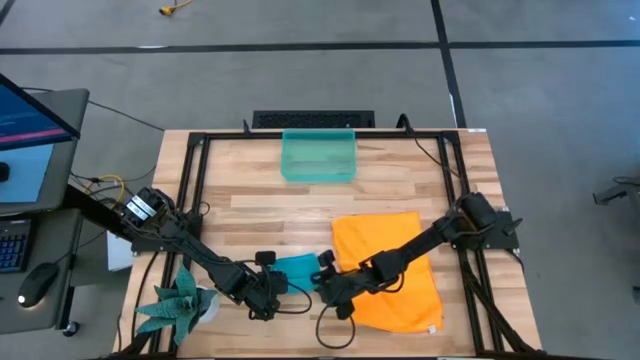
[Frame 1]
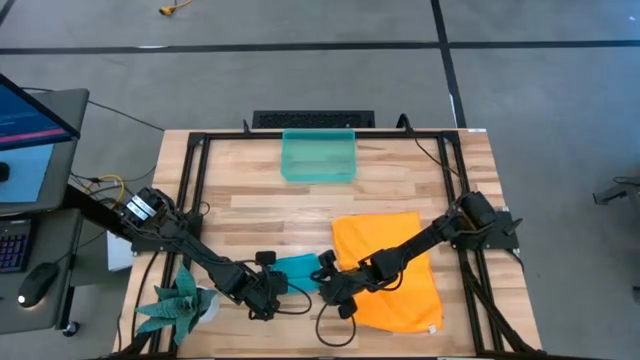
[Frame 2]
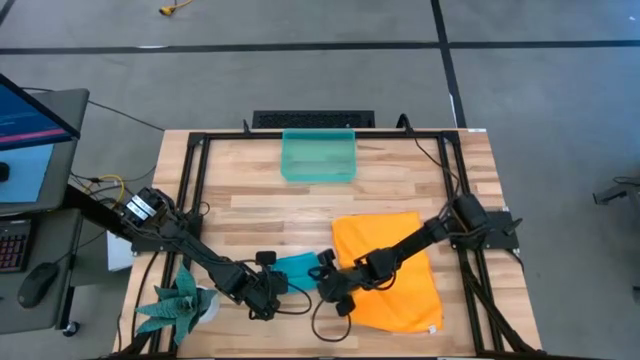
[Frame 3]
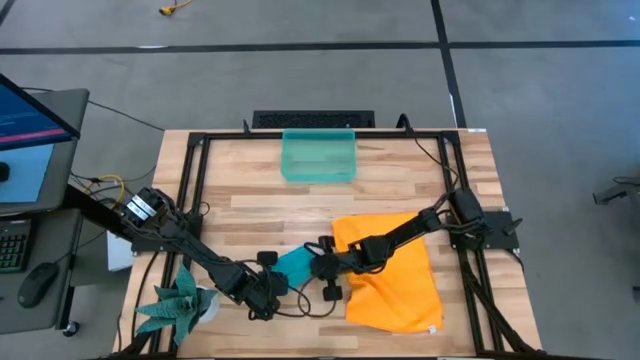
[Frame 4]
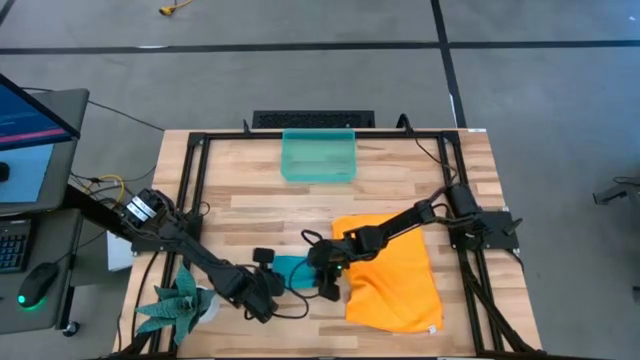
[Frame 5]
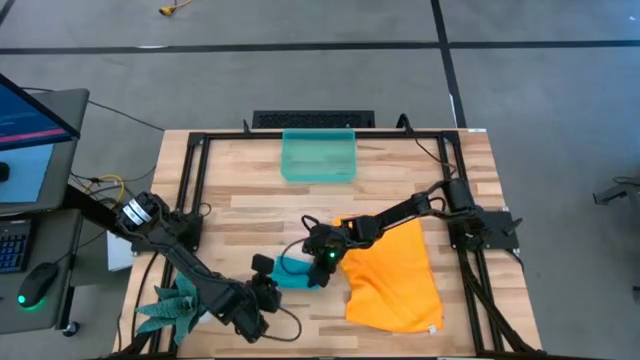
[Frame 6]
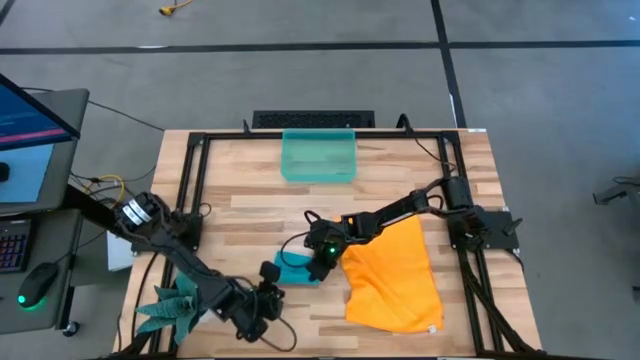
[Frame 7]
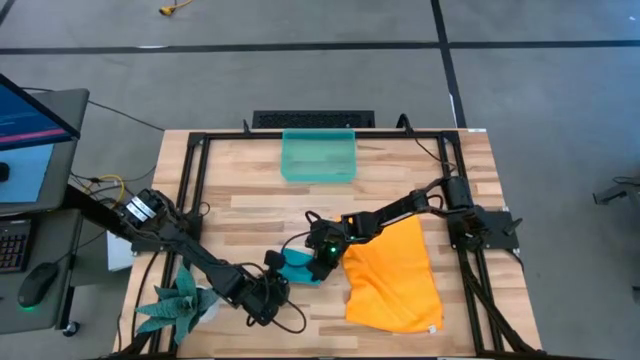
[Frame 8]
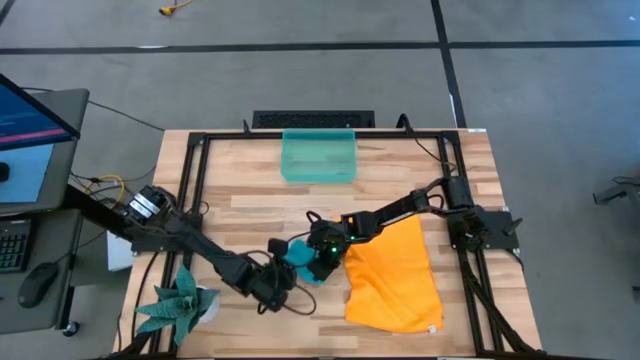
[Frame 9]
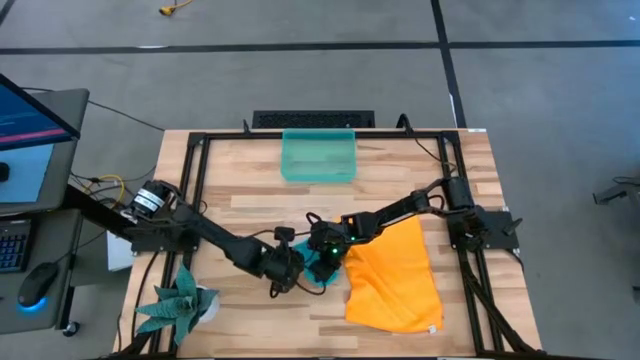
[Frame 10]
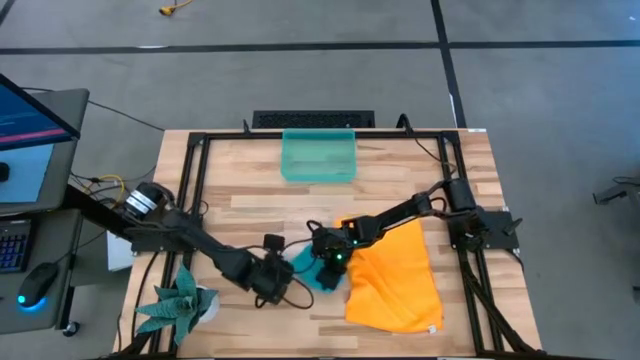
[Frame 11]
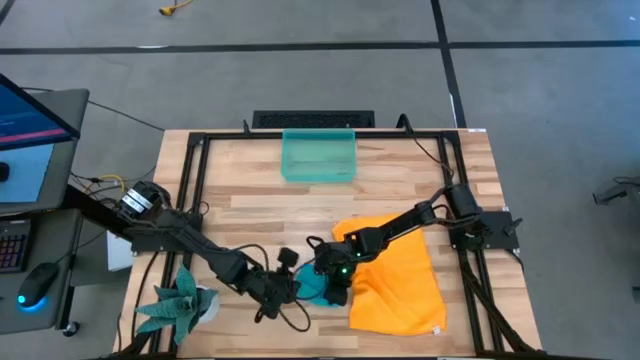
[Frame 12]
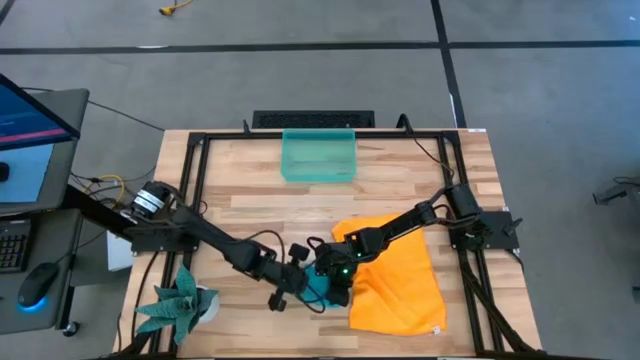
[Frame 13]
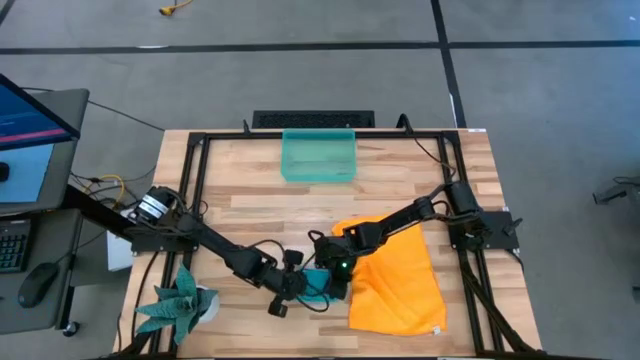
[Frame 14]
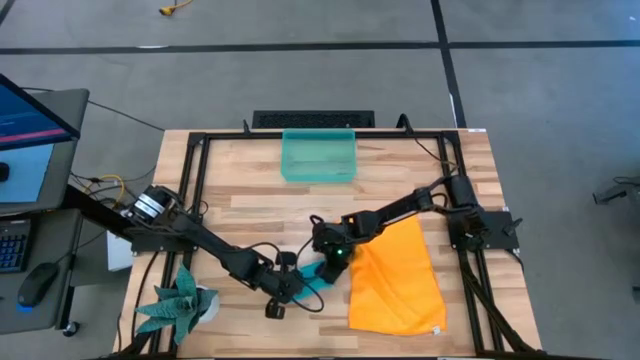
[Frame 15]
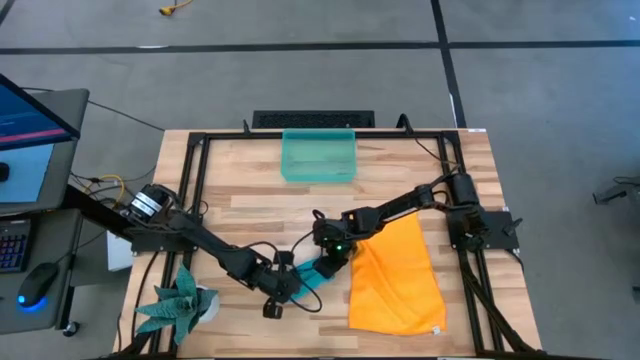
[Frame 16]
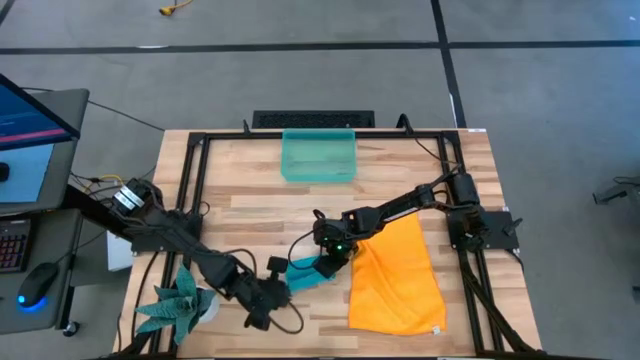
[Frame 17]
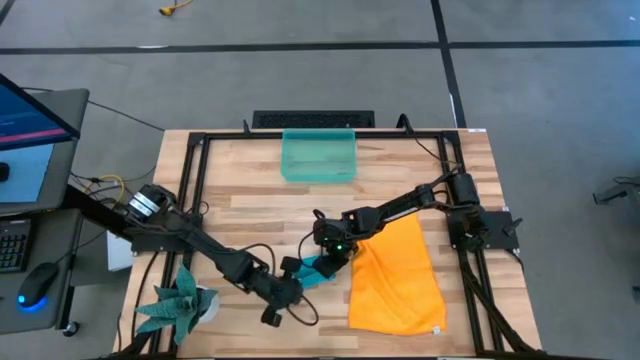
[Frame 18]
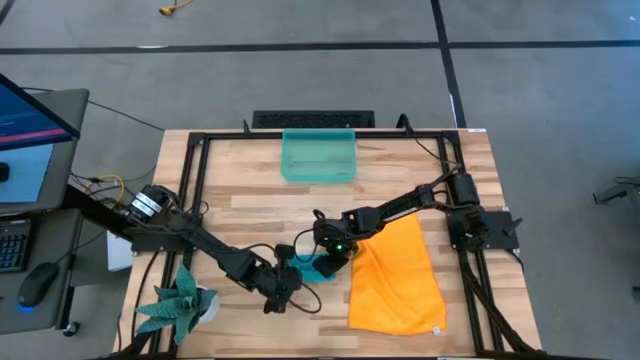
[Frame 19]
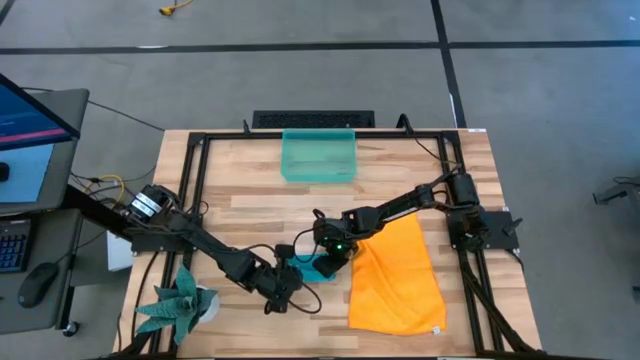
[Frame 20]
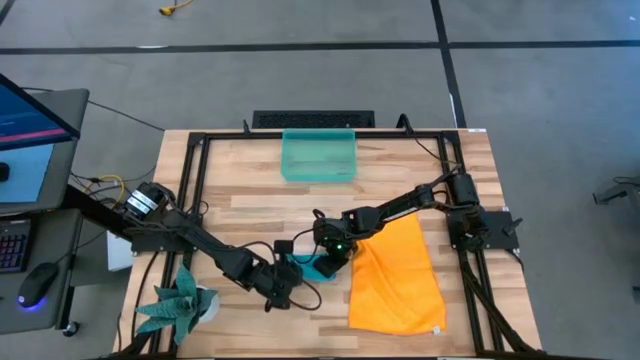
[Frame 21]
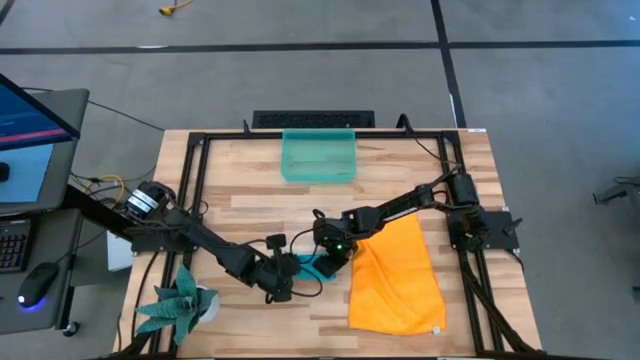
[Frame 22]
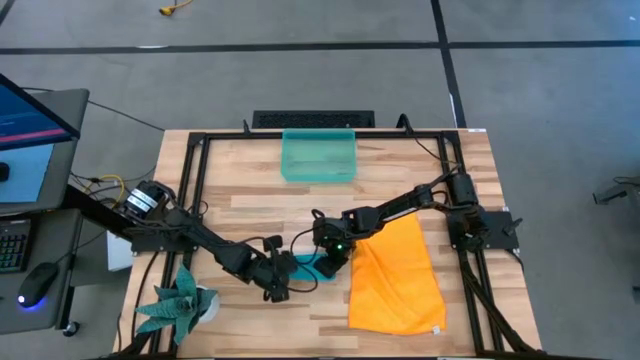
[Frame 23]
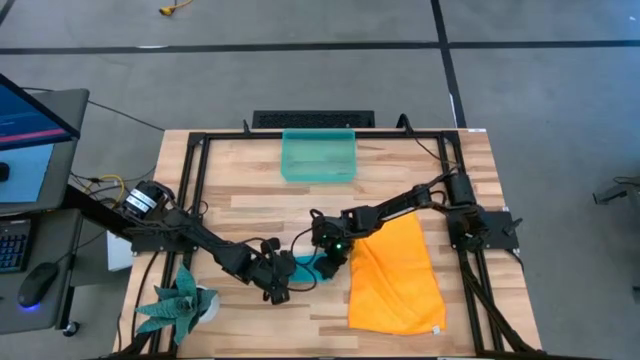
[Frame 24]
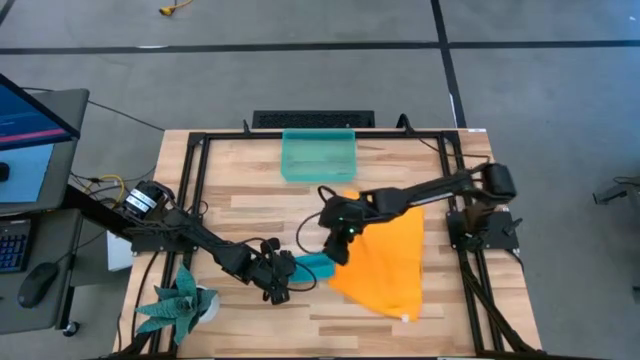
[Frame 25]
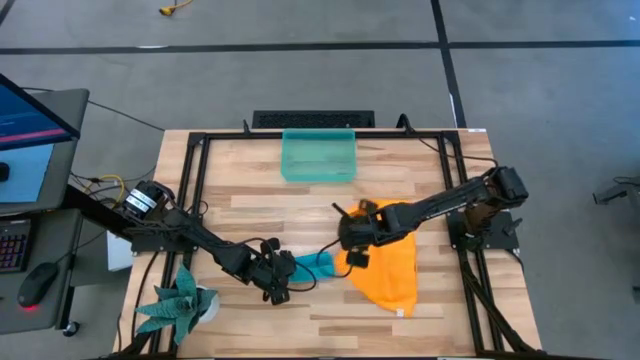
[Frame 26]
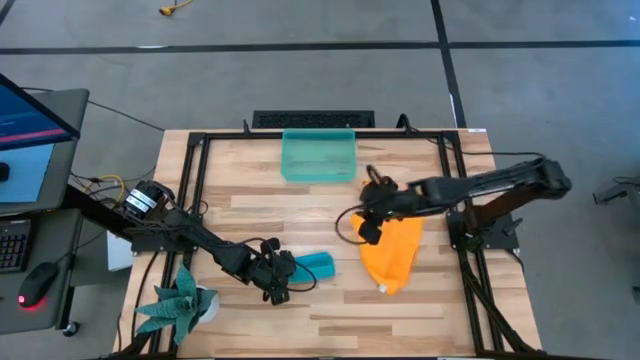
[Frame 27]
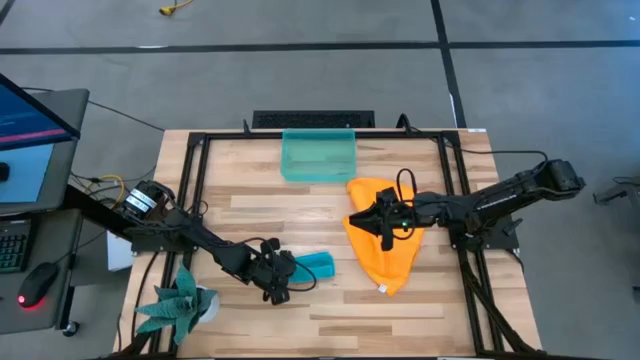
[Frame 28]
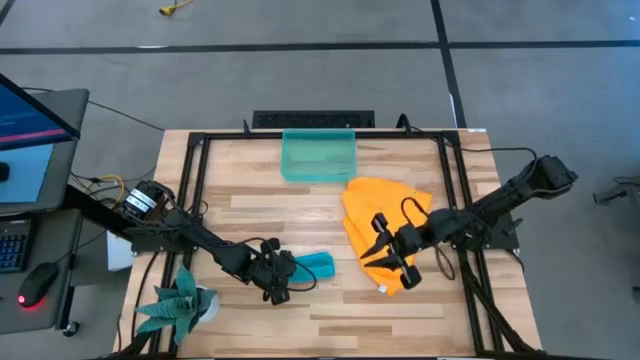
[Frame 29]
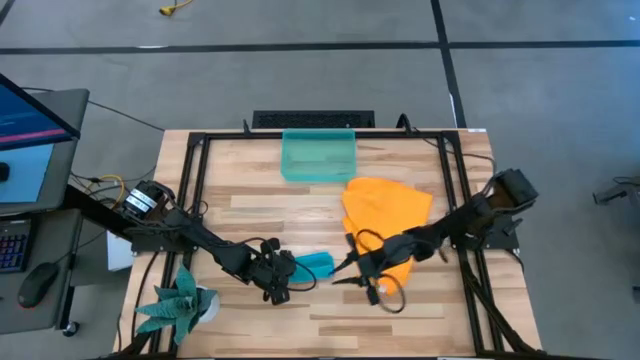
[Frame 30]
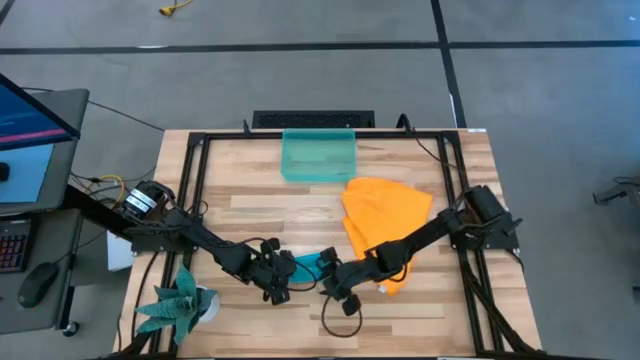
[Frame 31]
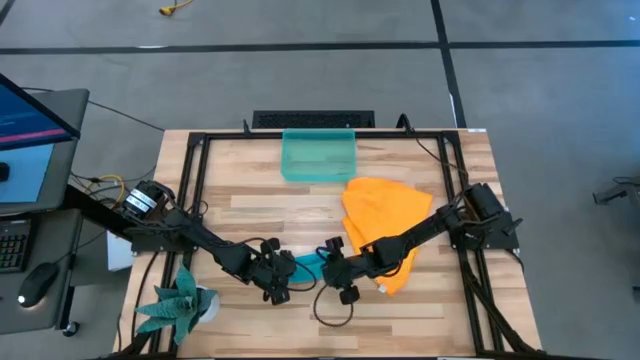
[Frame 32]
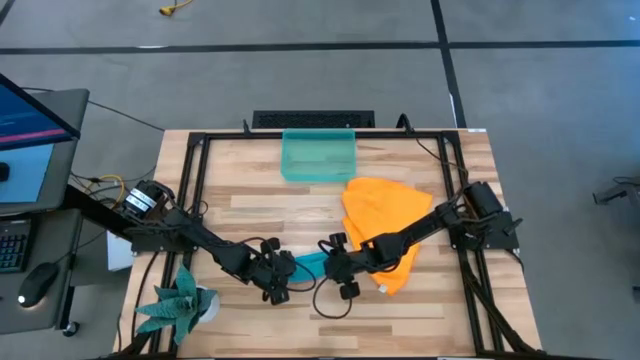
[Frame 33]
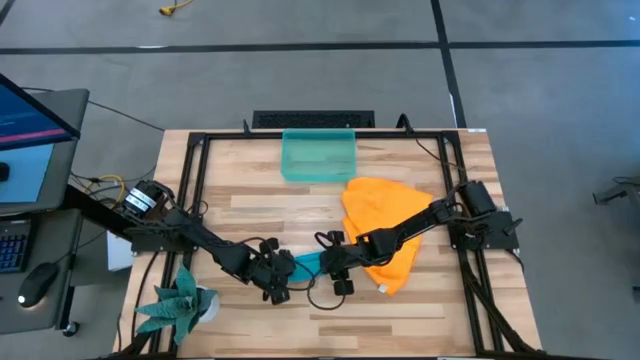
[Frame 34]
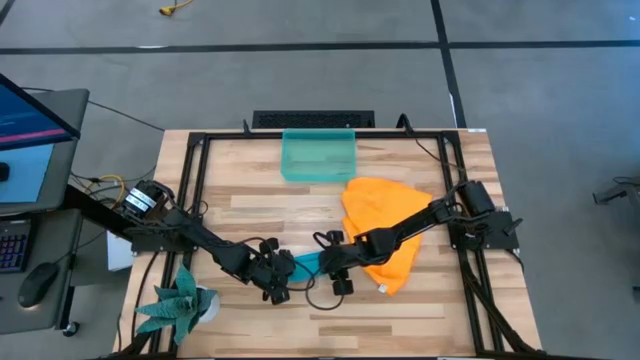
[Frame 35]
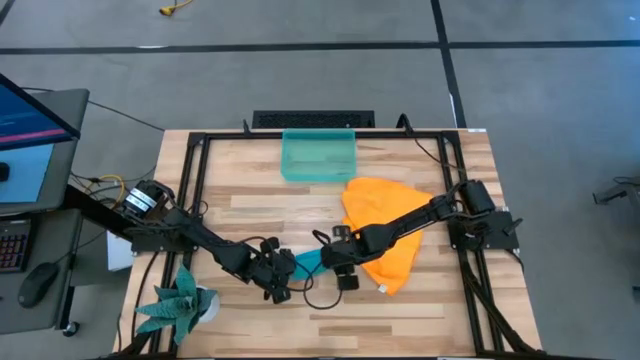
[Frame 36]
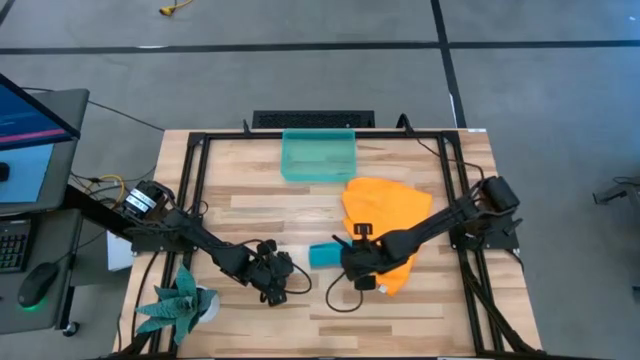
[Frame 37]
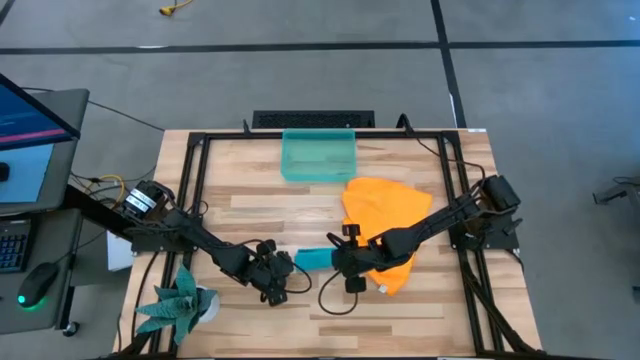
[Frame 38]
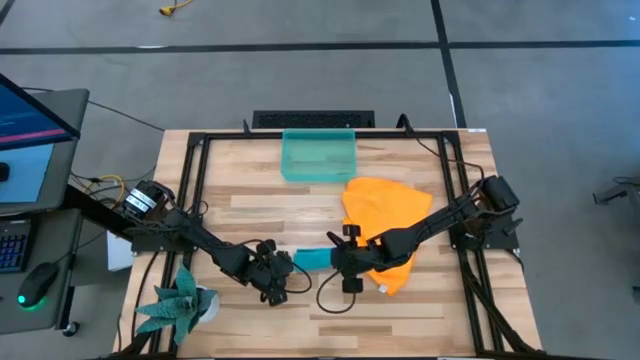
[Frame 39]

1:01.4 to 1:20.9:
Task: Roll microfiber towels into tight, uniform cylinder then place into a basket
Roll the blue microfiber cloth
